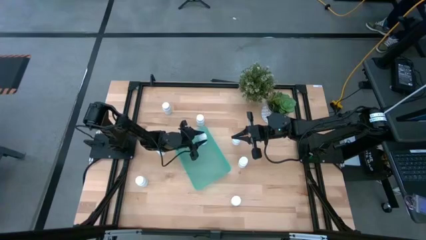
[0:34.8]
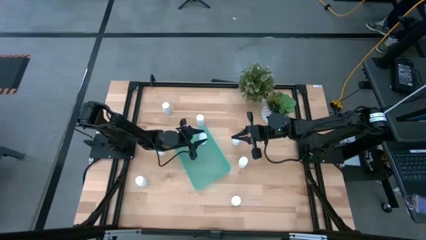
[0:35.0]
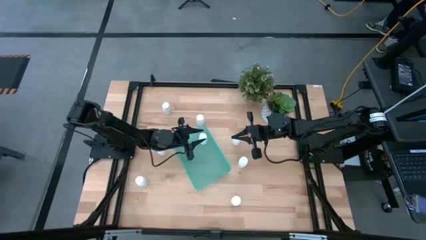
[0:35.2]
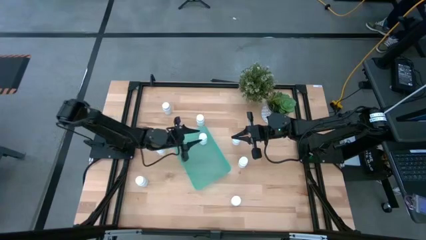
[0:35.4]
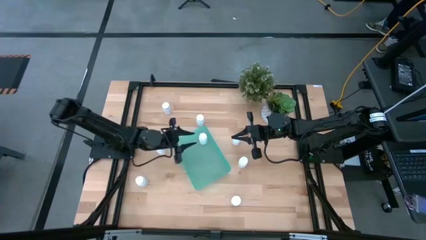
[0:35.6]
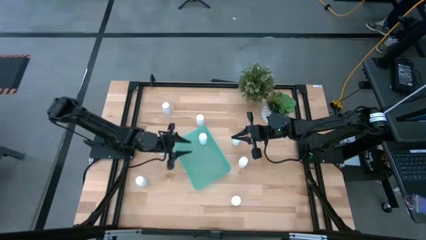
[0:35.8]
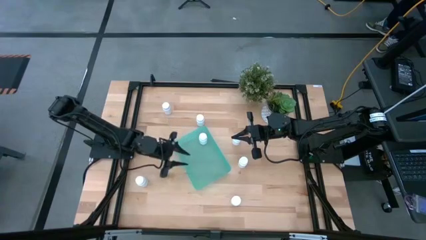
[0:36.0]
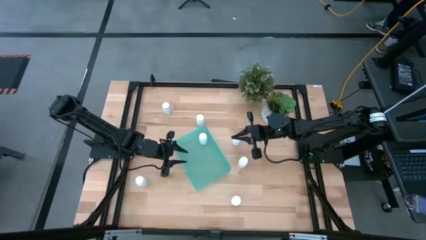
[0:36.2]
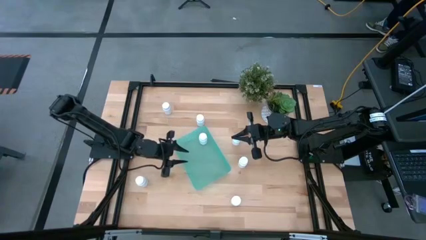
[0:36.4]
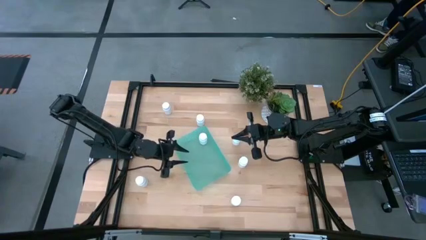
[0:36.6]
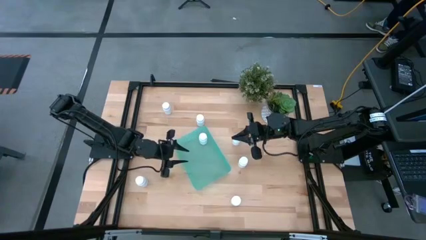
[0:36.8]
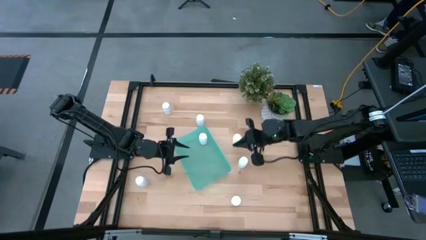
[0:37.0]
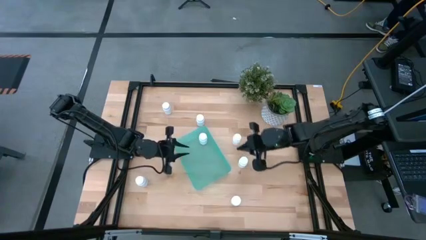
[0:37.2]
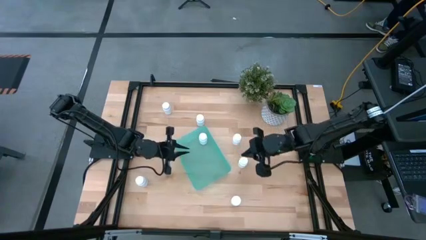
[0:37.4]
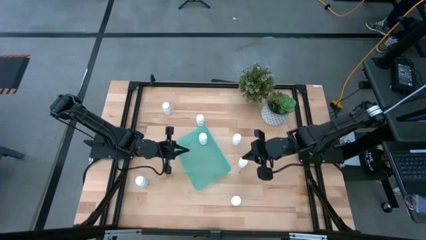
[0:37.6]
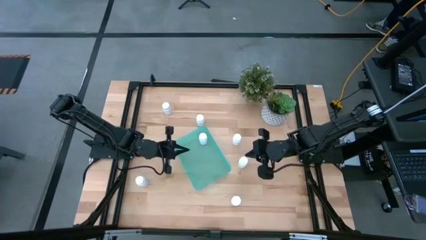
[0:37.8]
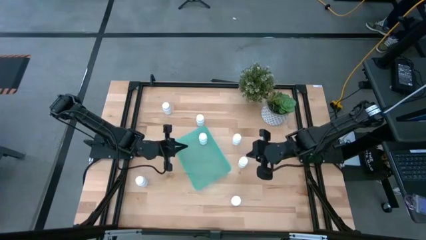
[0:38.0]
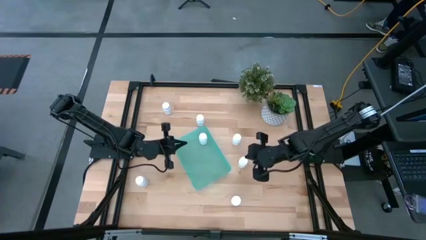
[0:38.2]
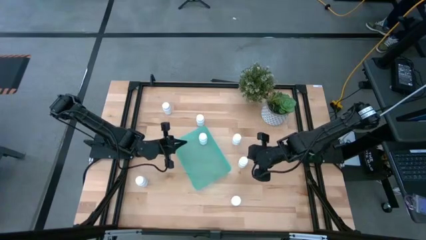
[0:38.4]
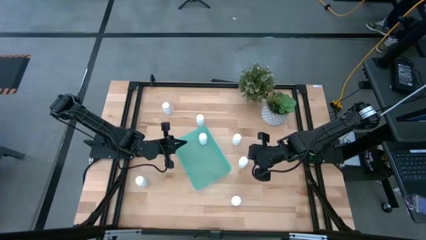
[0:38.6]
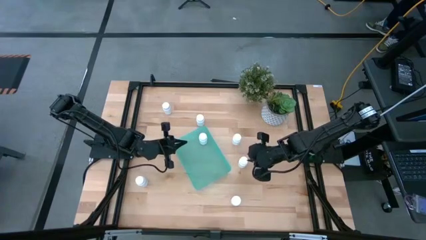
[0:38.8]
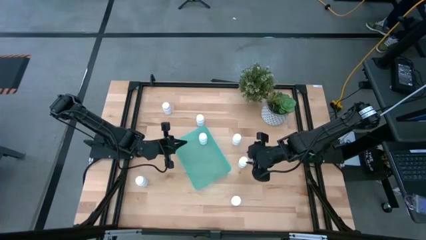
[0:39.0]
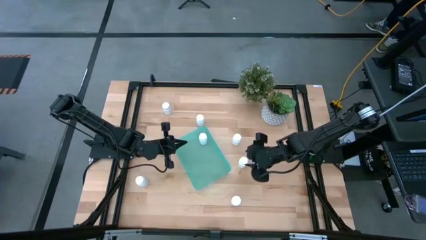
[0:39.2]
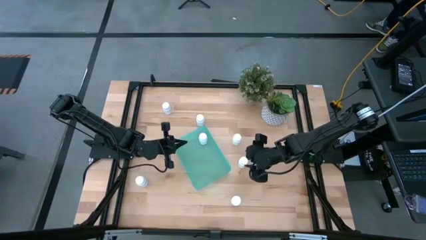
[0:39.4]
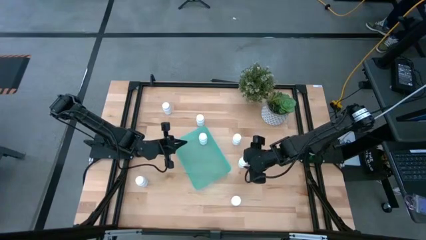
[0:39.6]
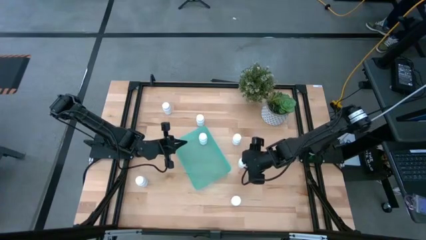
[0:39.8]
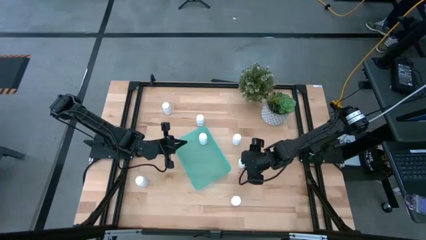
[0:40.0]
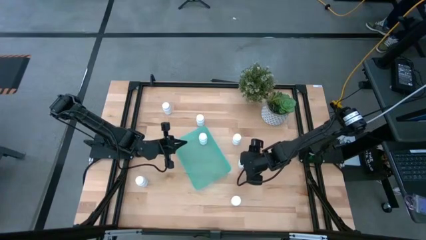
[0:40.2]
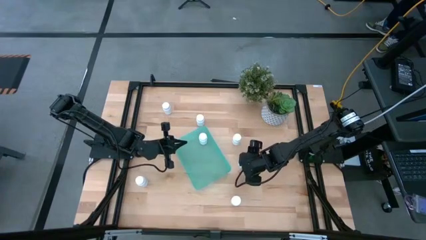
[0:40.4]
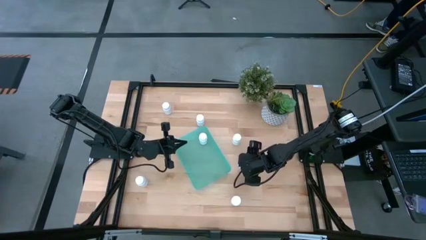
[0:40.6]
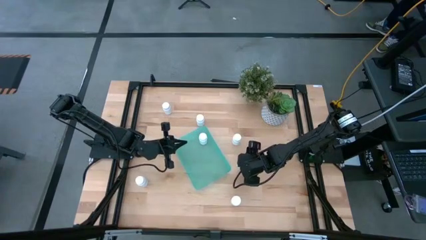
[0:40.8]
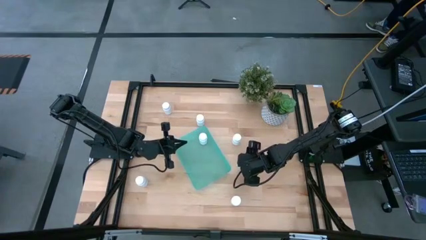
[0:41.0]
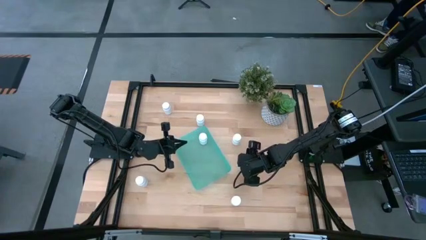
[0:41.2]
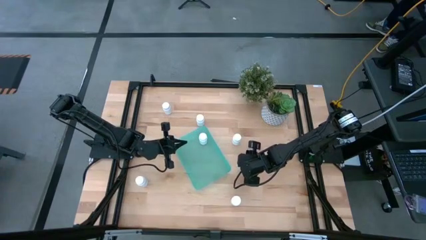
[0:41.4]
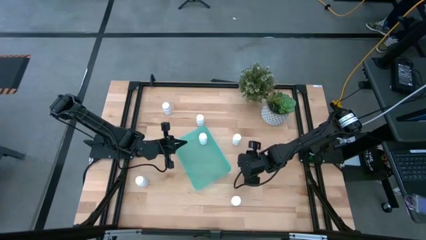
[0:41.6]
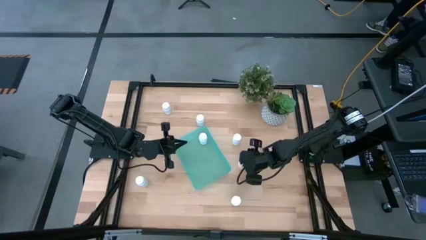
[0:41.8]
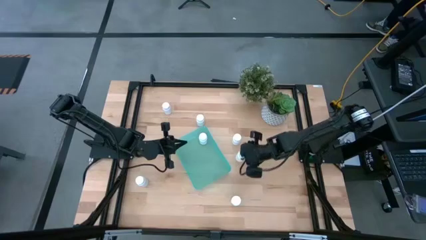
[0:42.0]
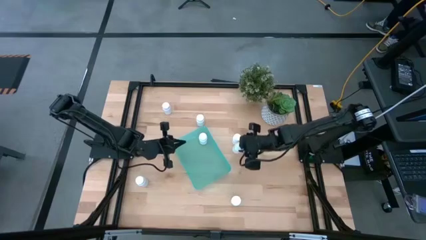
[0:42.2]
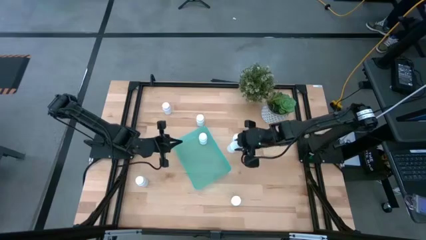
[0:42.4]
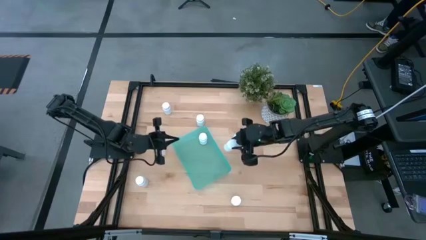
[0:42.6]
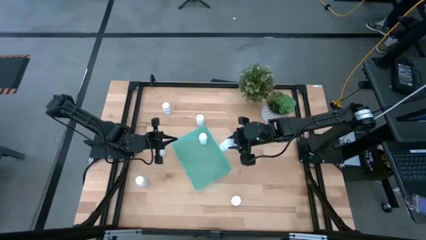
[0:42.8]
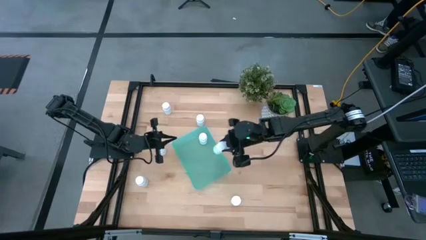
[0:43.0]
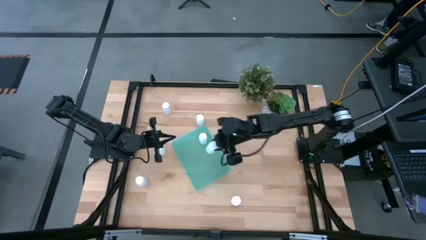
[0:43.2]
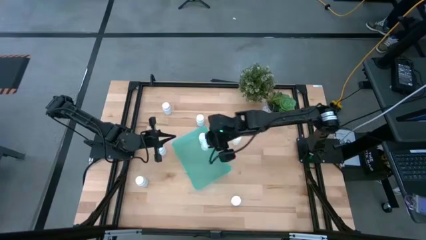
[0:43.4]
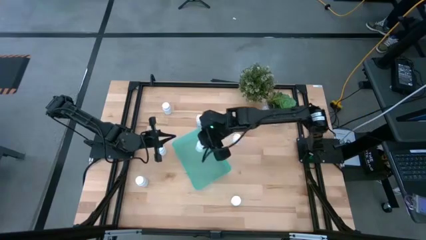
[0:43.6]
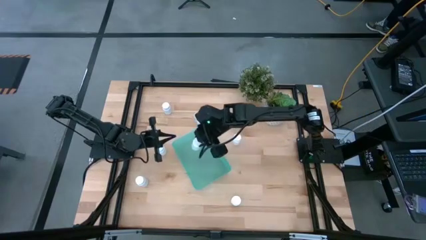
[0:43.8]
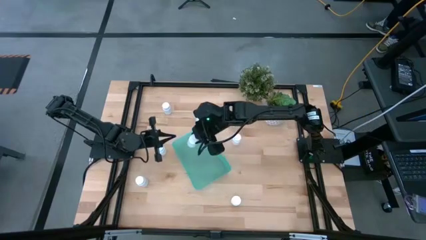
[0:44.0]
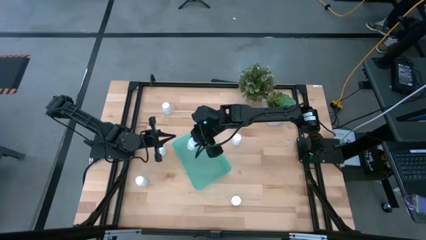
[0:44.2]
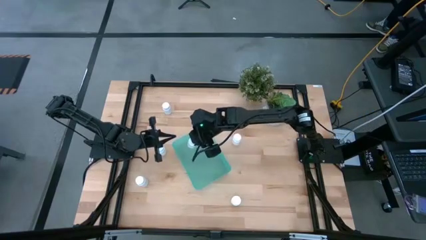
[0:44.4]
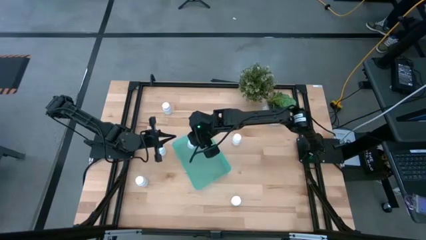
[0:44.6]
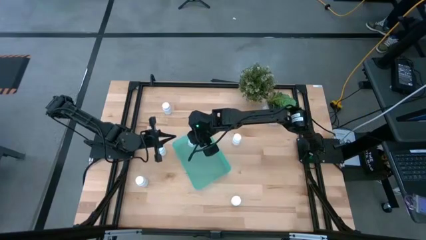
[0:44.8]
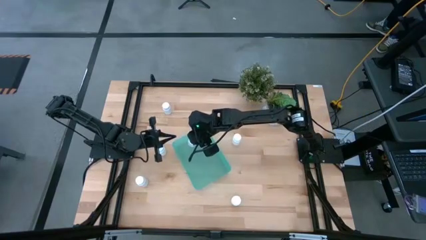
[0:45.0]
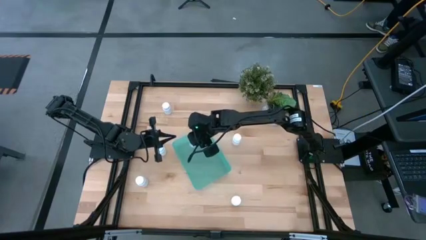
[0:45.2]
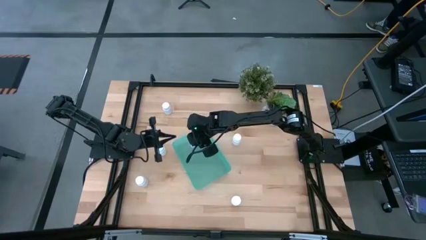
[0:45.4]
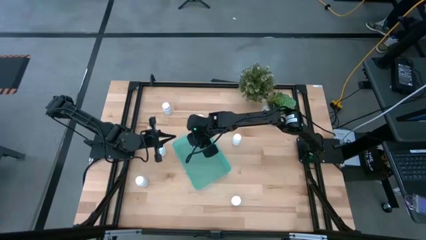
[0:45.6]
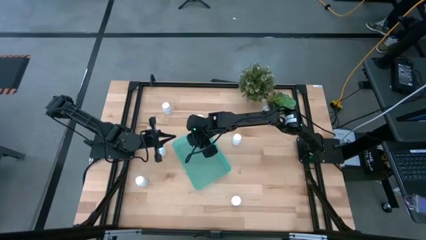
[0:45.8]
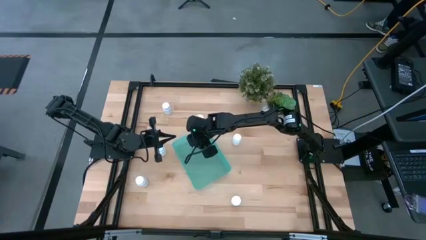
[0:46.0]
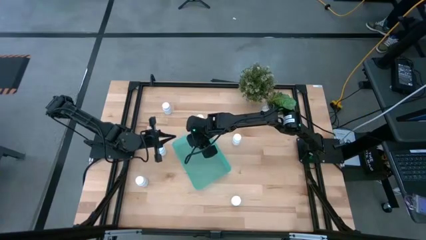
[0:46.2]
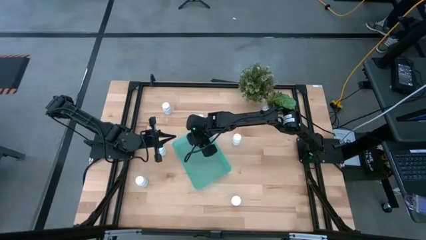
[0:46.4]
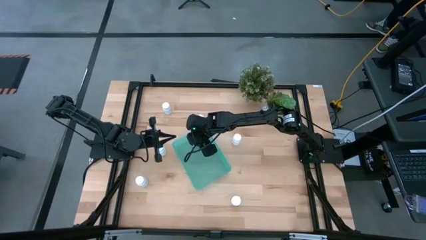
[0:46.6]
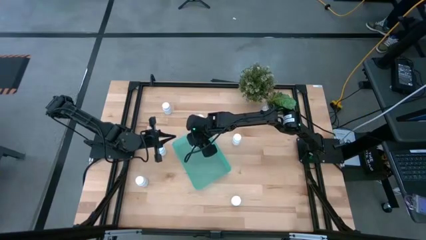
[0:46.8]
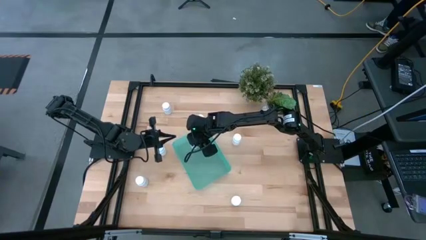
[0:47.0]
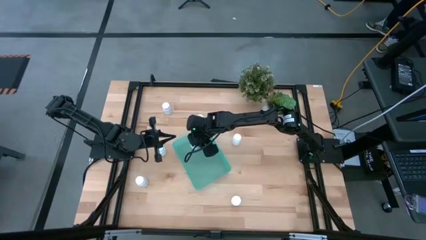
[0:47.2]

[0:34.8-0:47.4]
Task: Pick and place pill bottles into a basket
Put the white medicine bottle into the green bin

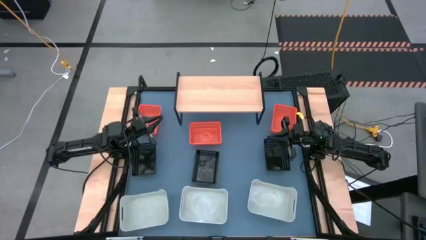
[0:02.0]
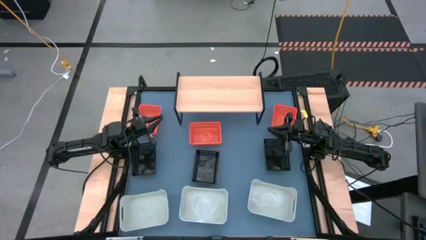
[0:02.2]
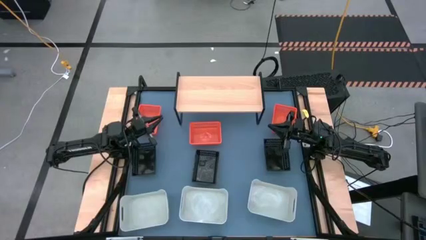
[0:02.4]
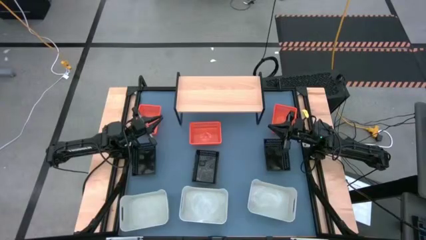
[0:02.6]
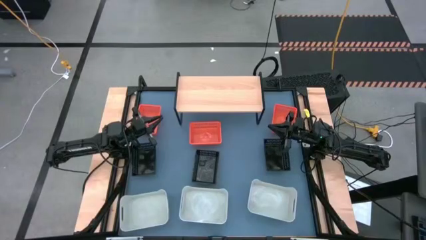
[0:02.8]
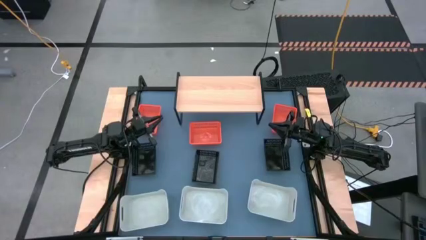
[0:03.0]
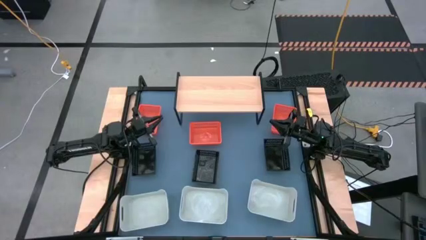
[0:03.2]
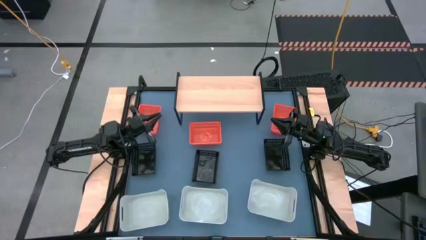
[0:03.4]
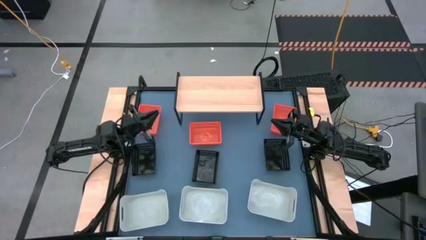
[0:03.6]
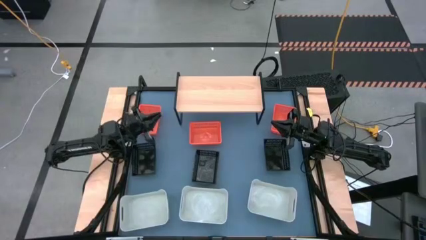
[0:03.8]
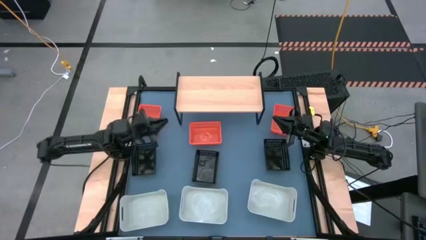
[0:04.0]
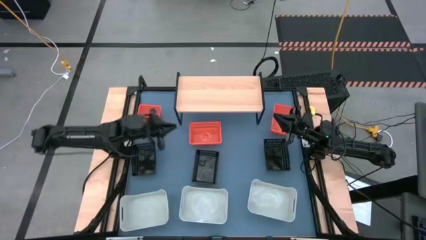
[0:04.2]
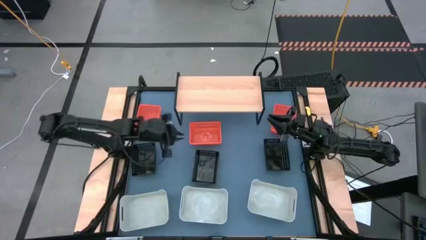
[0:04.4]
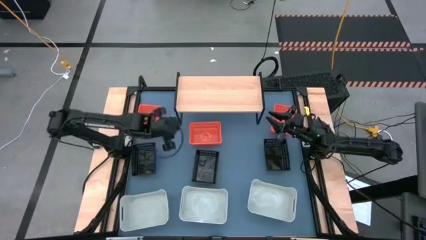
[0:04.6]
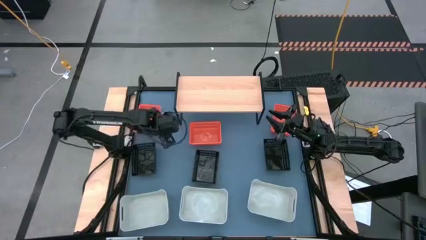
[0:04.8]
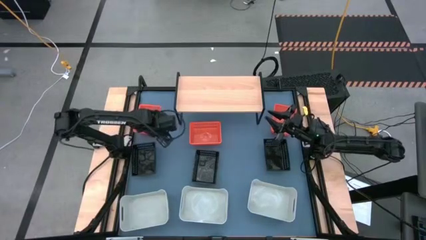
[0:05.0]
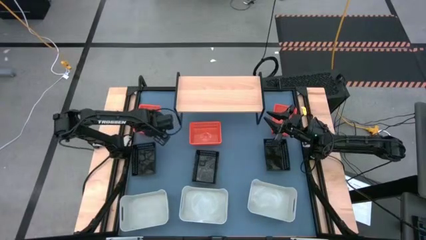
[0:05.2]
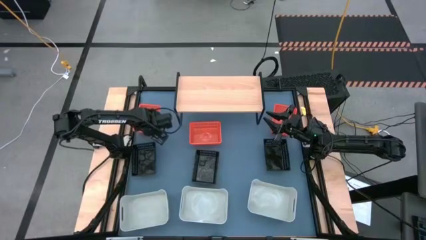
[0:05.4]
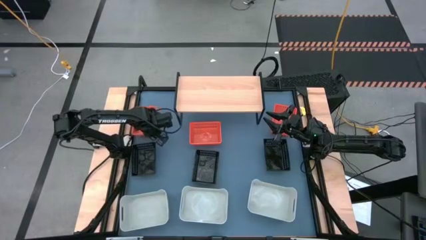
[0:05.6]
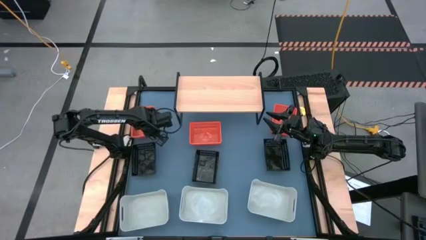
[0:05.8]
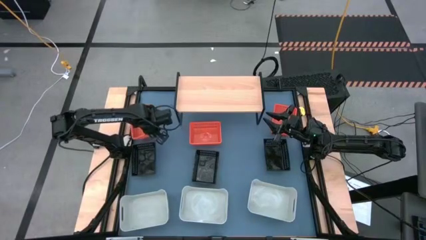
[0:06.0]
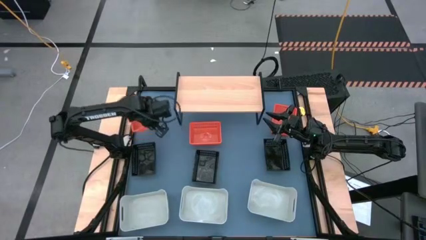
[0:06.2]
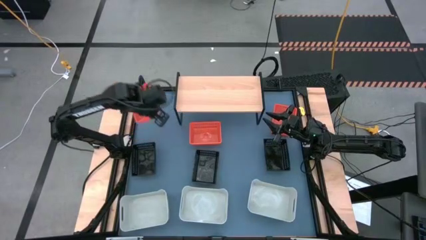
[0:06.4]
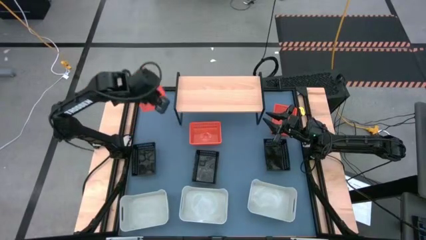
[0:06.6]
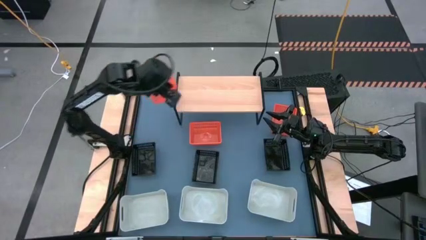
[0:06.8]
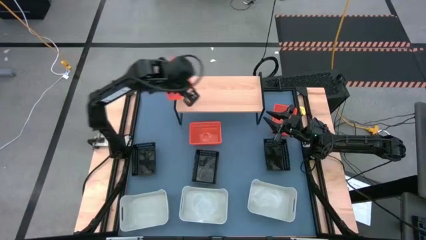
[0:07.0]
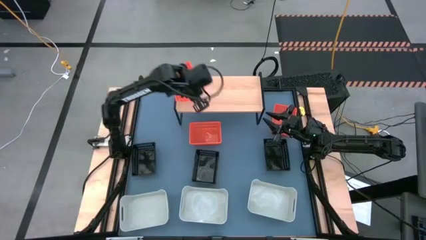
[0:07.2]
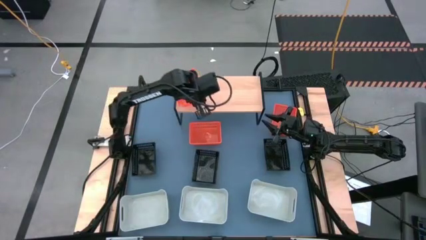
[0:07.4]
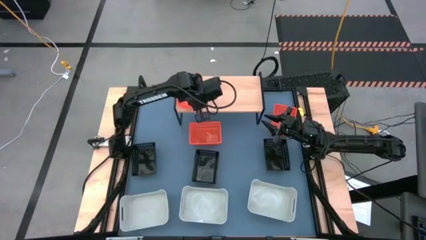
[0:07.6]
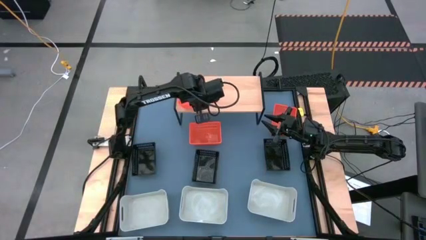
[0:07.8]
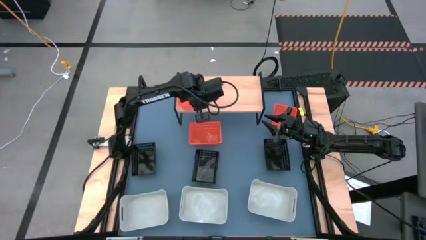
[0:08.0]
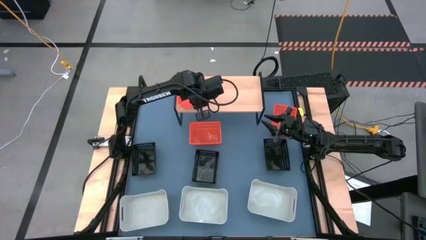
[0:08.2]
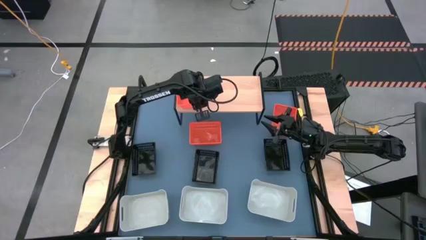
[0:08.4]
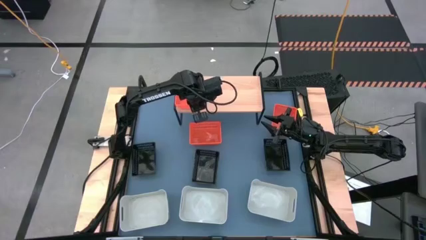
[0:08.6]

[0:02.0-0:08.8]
Task: Stack baskets on shelf by color
Put the left orange bin on the shelf
